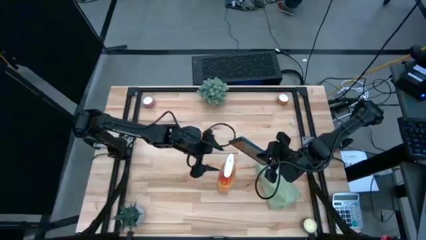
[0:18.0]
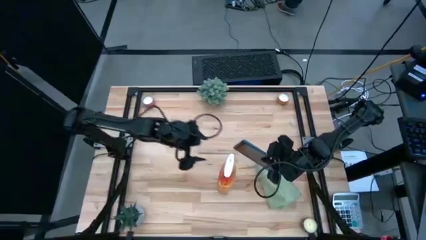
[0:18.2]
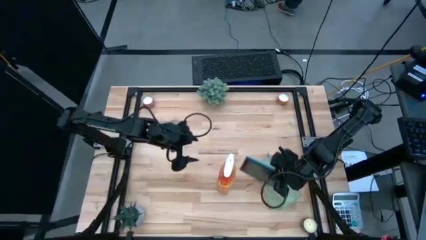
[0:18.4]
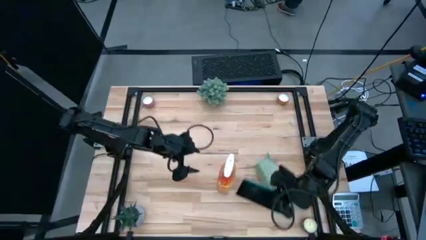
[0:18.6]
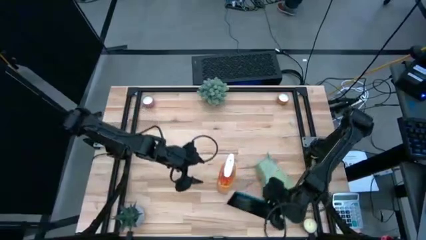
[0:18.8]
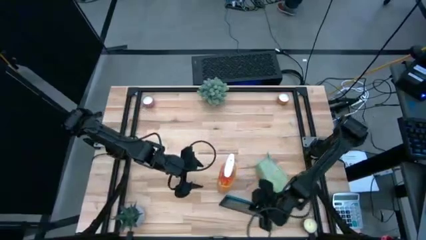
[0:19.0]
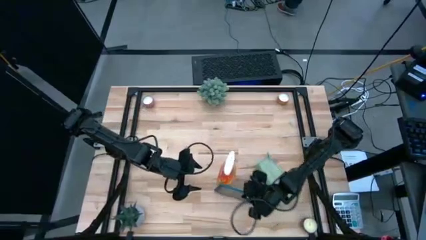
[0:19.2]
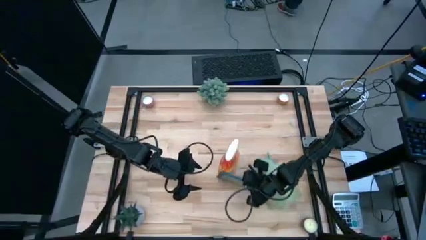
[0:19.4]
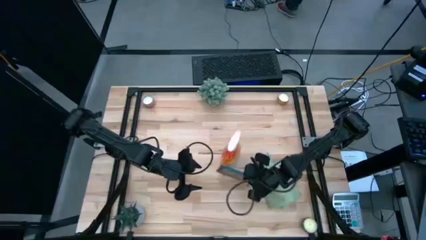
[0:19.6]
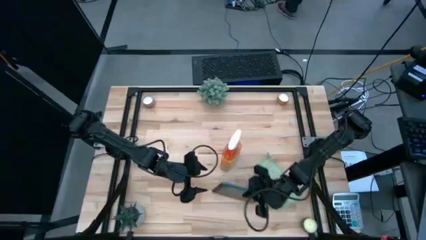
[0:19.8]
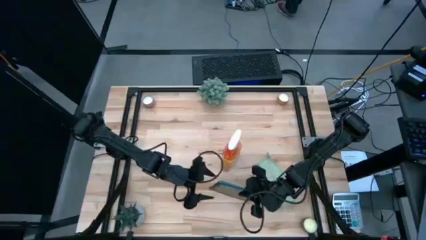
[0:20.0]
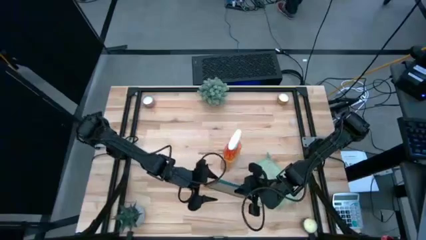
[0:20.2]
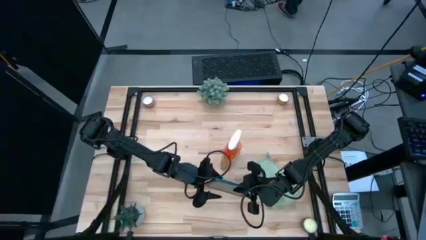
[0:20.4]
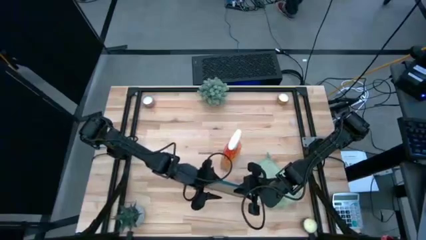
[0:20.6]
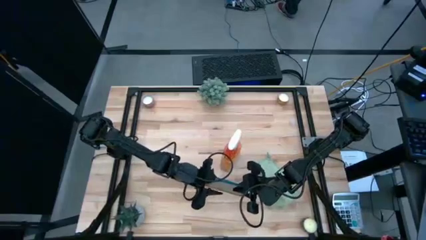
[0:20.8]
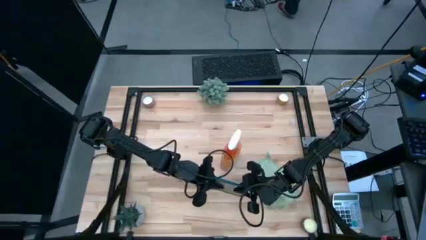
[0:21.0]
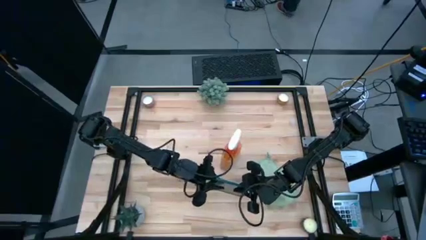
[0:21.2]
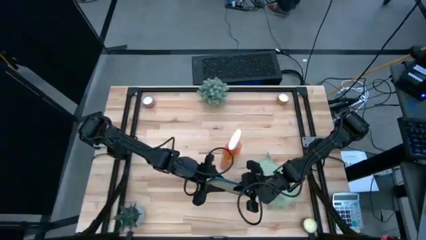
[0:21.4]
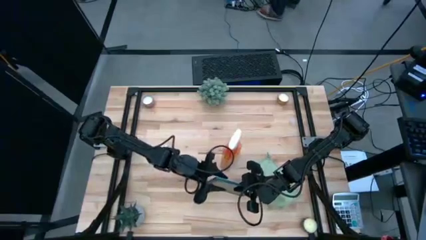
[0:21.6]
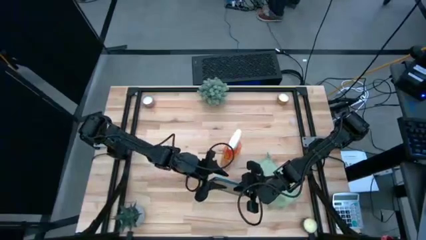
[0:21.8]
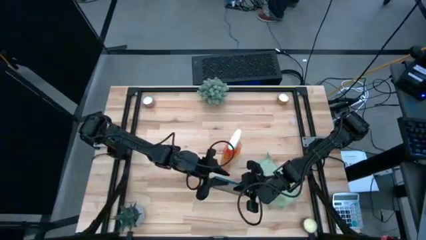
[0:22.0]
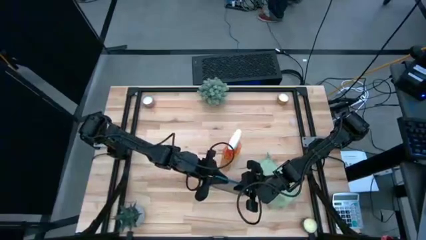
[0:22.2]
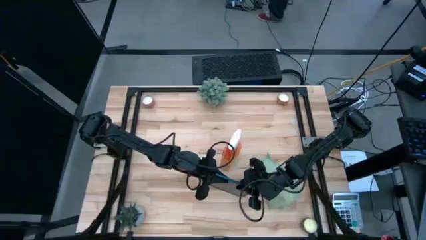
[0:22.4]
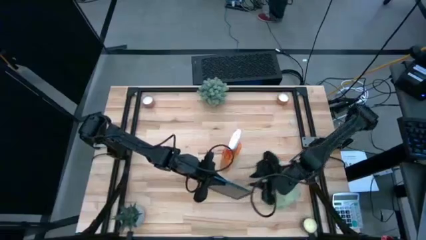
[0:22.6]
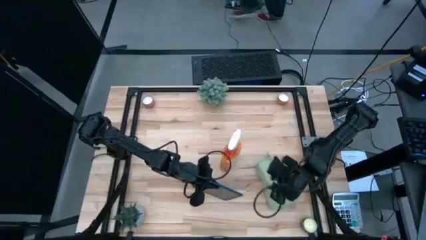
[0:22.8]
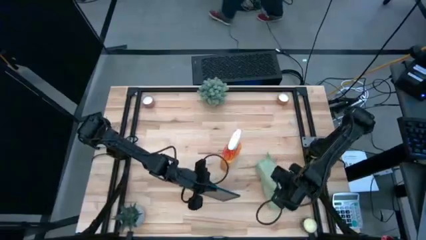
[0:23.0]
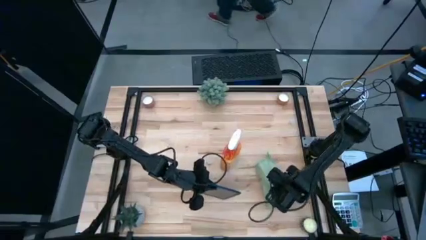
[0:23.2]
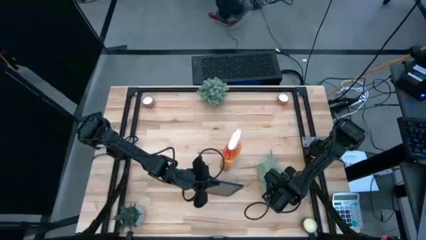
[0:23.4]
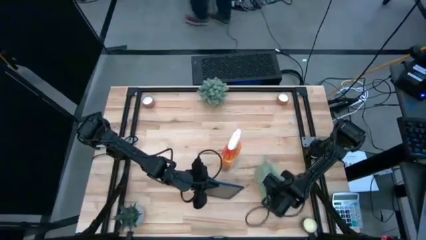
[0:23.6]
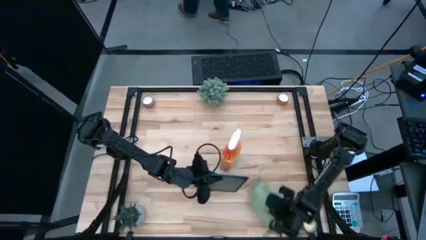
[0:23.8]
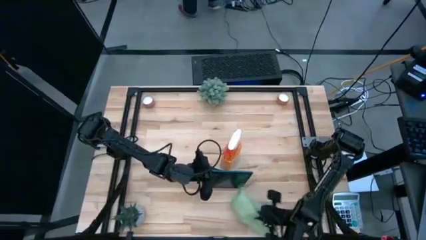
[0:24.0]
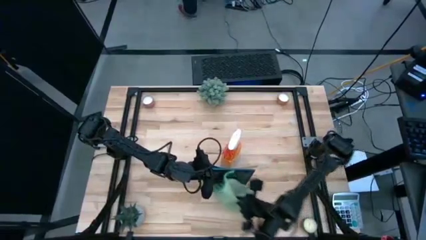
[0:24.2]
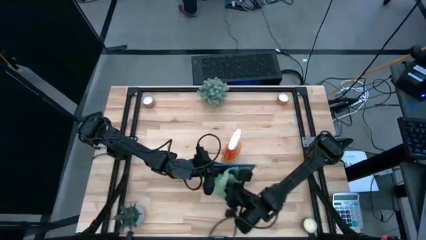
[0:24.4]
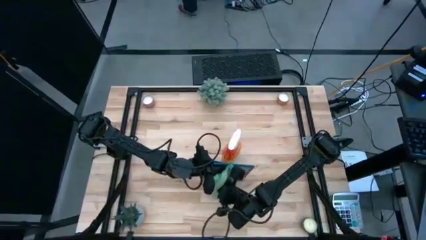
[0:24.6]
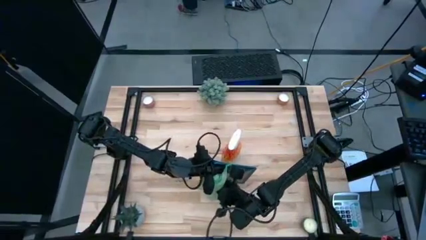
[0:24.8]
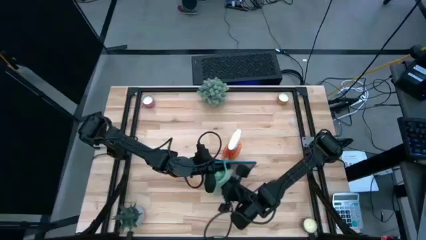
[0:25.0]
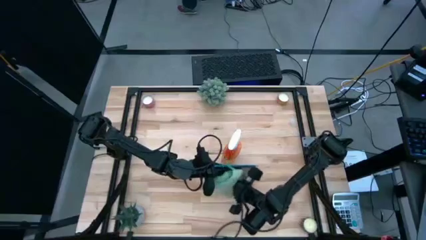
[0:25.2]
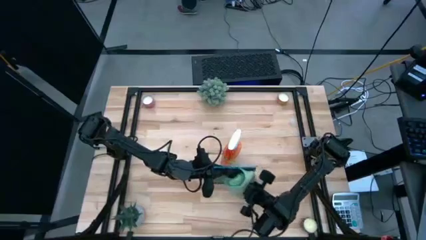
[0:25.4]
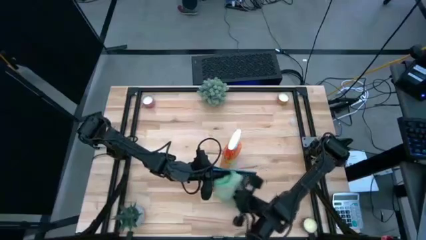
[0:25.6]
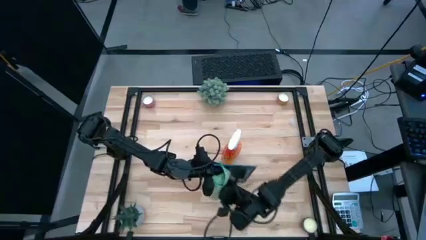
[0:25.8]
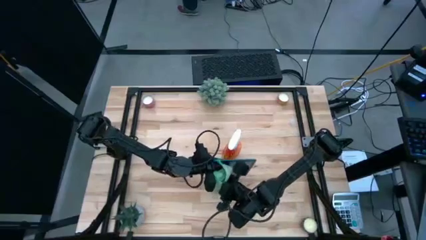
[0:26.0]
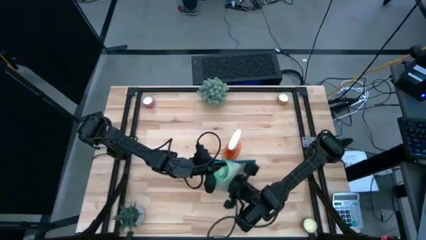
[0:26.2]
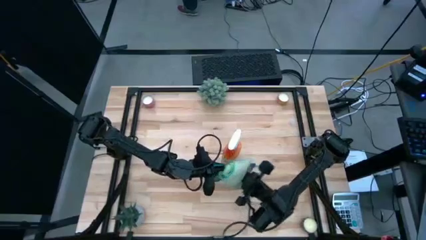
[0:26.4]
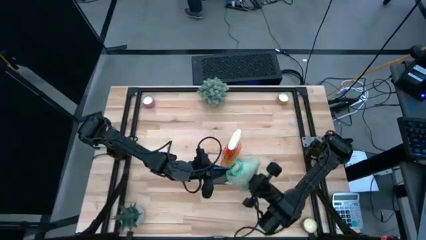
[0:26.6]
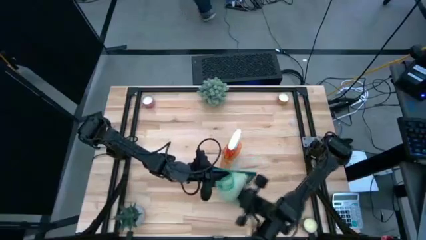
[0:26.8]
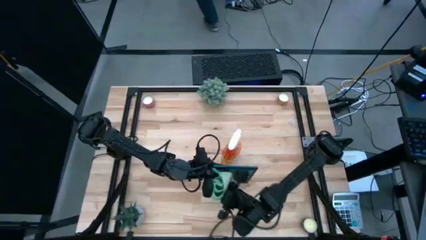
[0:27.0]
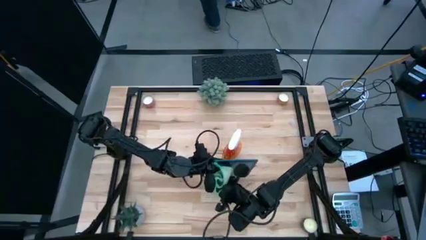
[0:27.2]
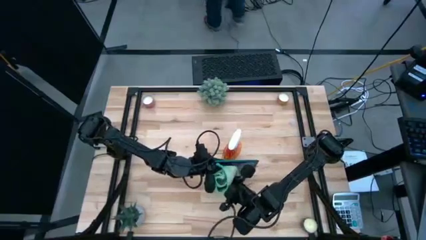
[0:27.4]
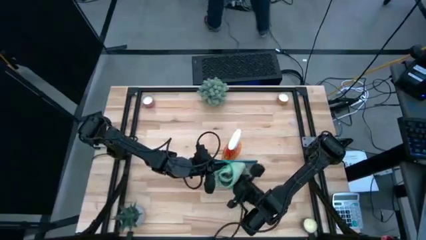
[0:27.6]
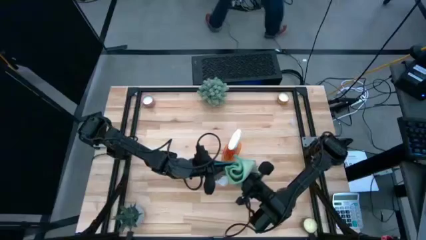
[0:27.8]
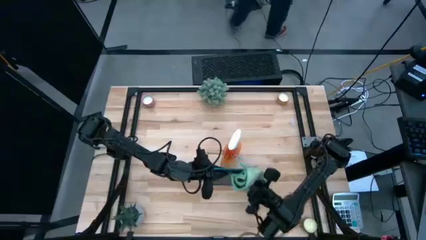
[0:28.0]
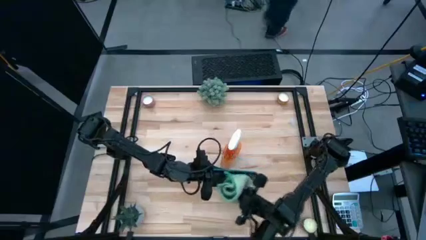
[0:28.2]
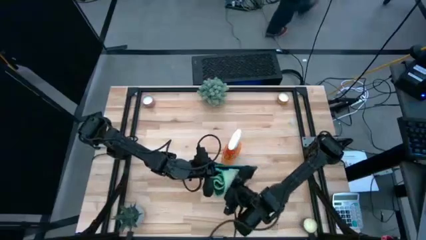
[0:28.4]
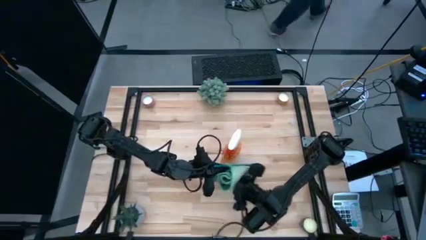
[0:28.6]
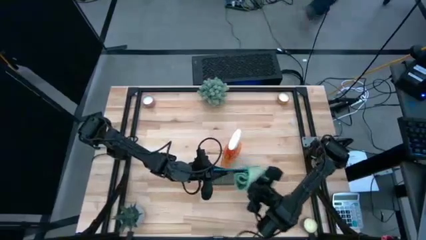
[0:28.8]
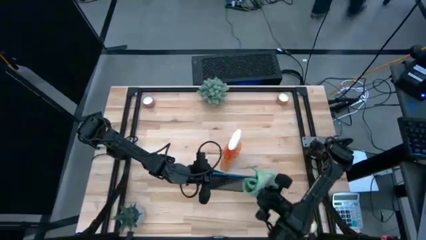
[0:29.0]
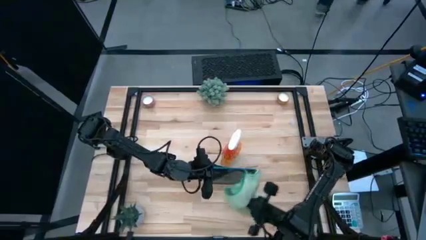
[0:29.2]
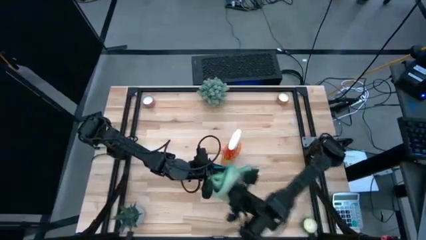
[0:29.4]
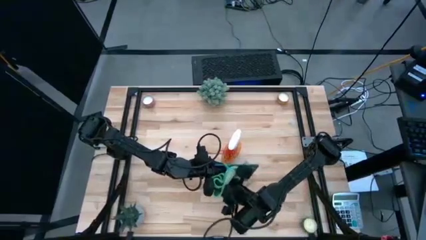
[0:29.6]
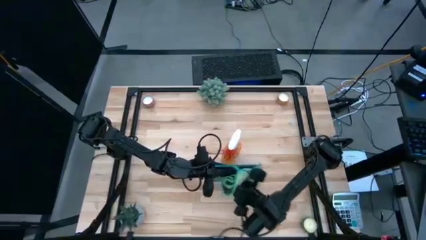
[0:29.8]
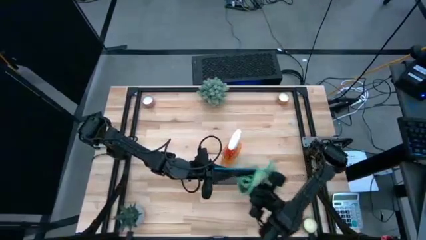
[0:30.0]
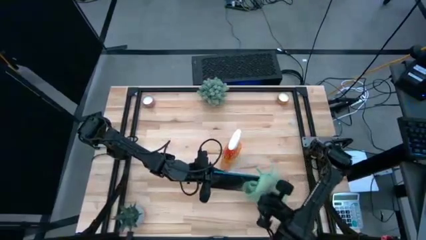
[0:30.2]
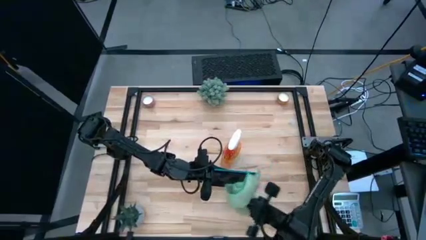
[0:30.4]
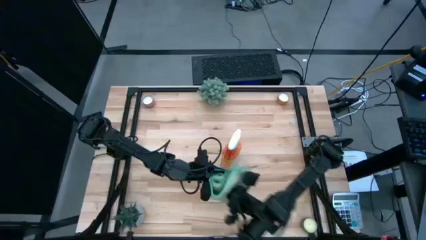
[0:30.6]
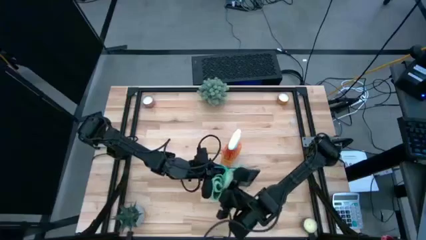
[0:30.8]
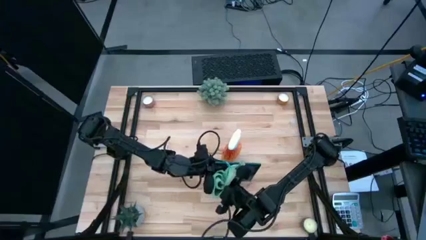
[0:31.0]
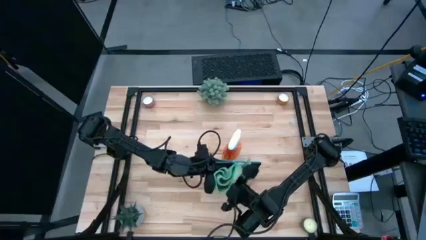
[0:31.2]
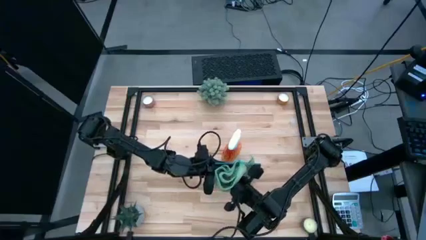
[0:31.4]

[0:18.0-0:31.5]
Task: Apply microfiber cloth
Wipe the front of the blue tablet with the green microfiber cloth
